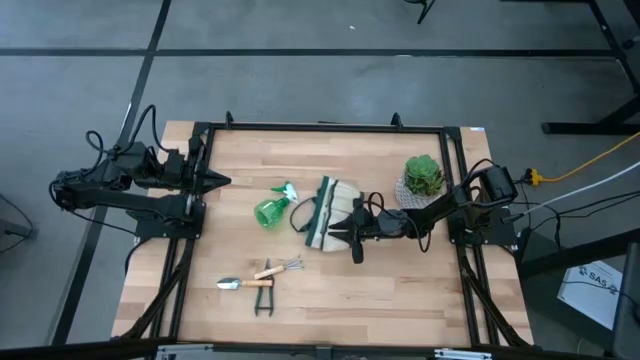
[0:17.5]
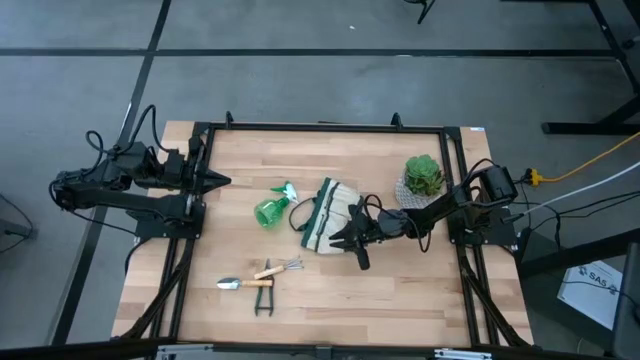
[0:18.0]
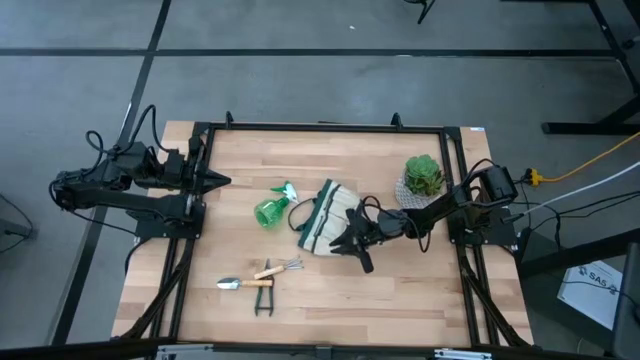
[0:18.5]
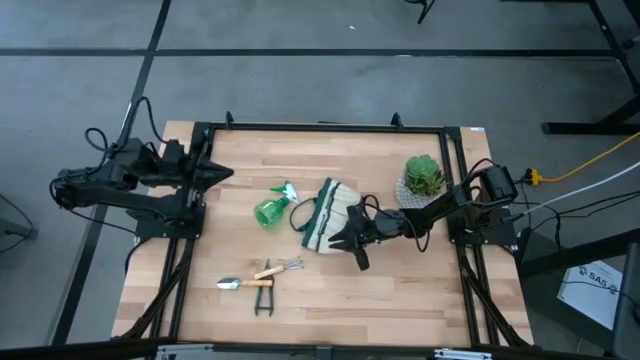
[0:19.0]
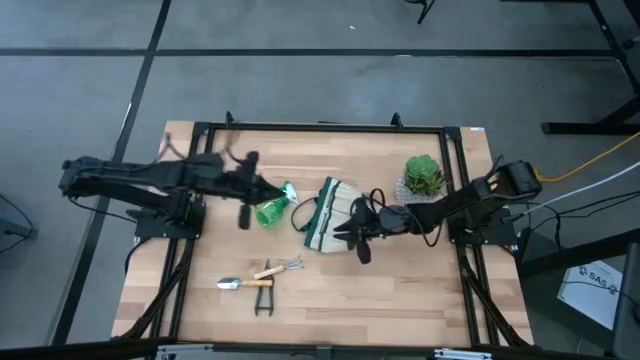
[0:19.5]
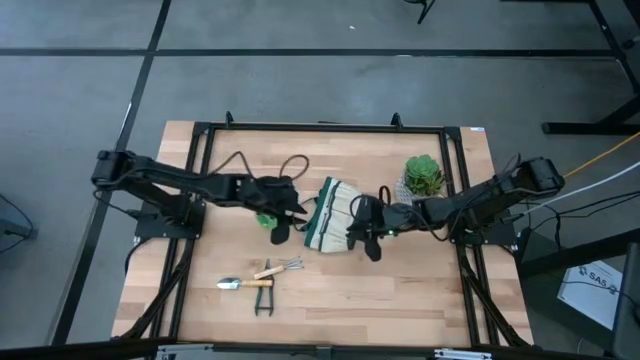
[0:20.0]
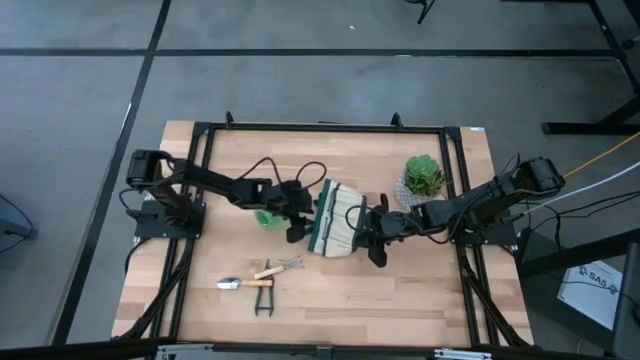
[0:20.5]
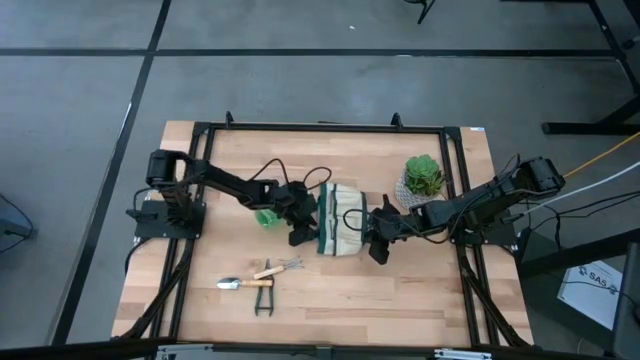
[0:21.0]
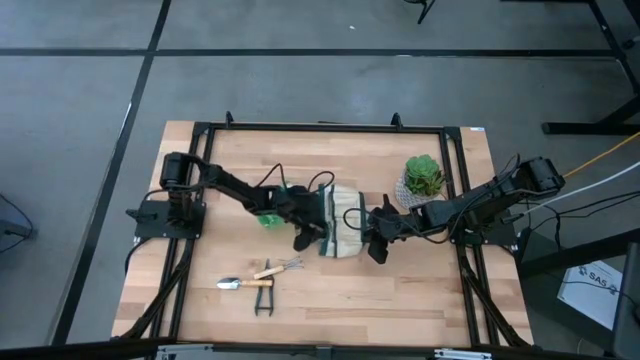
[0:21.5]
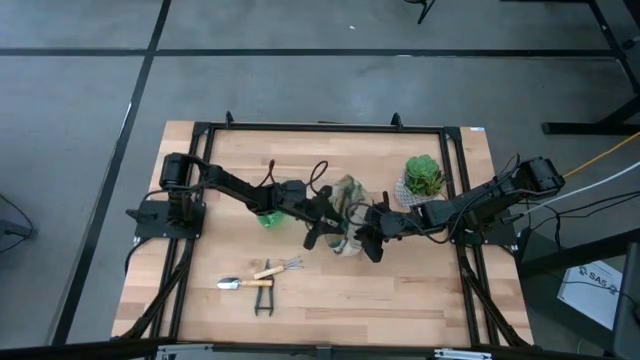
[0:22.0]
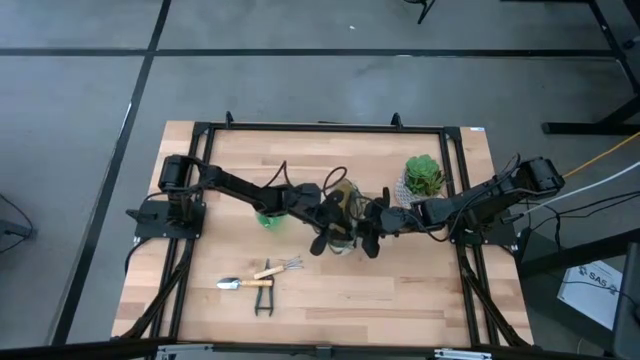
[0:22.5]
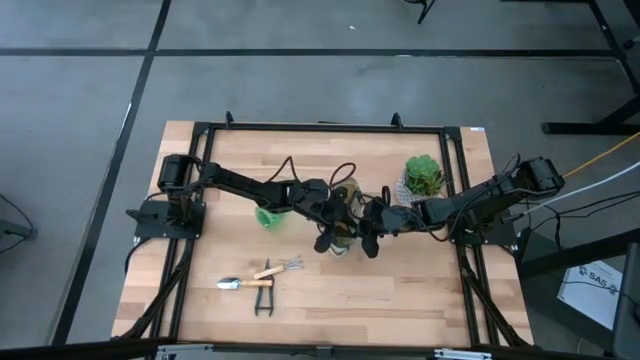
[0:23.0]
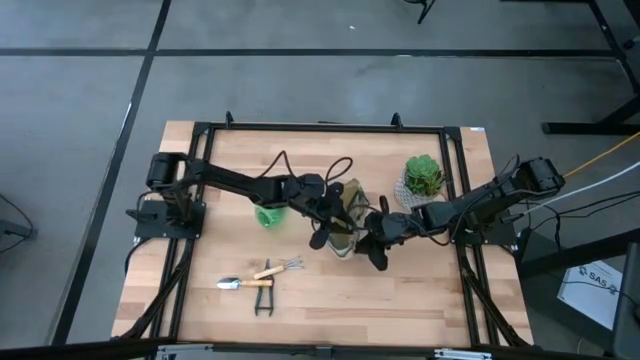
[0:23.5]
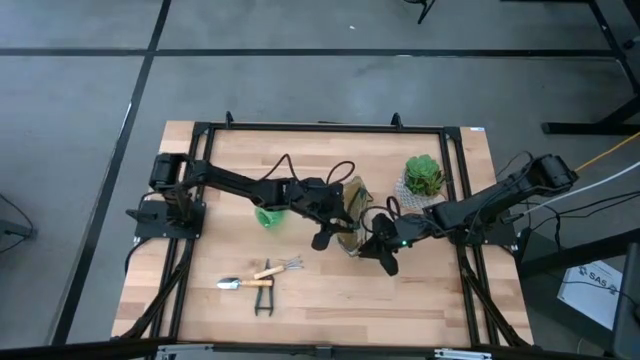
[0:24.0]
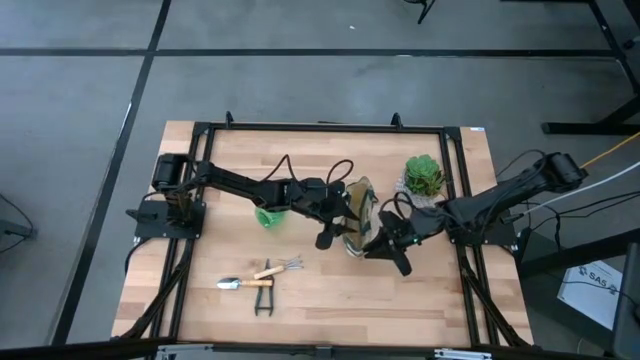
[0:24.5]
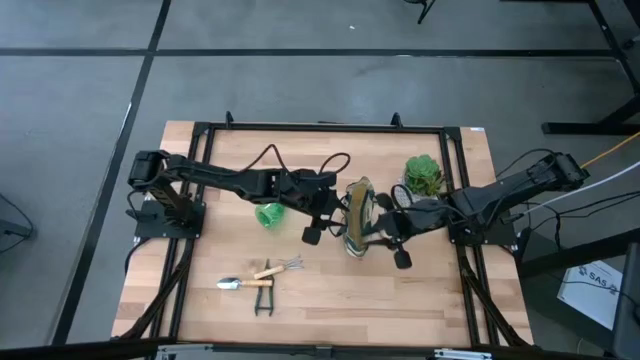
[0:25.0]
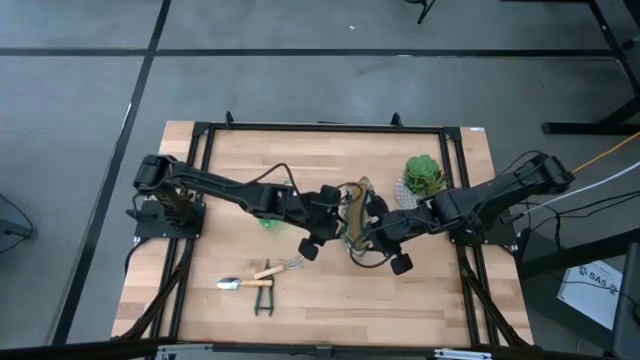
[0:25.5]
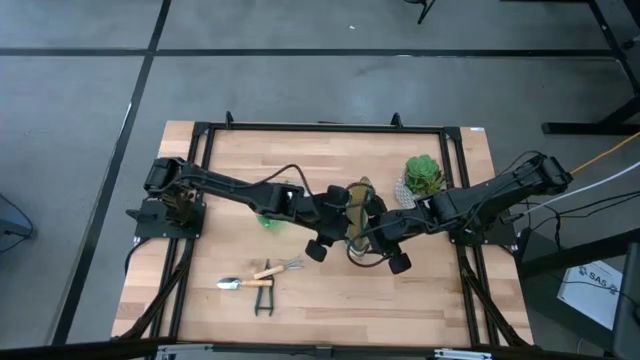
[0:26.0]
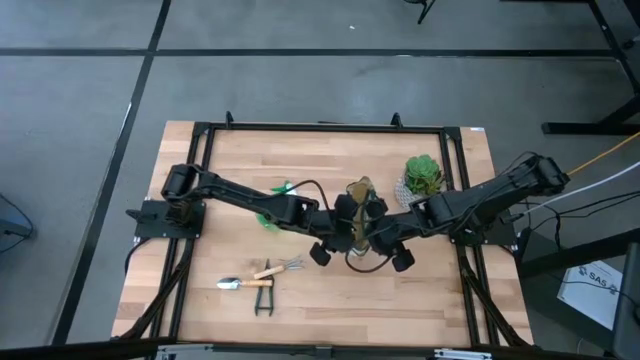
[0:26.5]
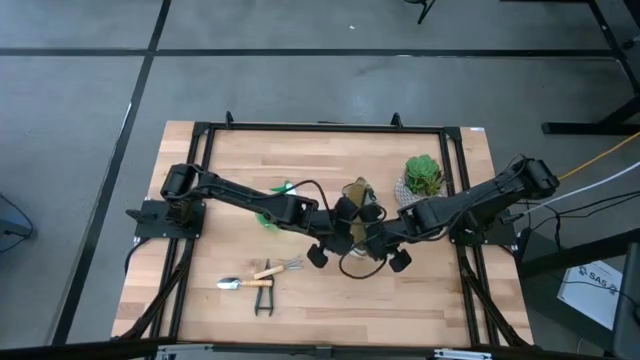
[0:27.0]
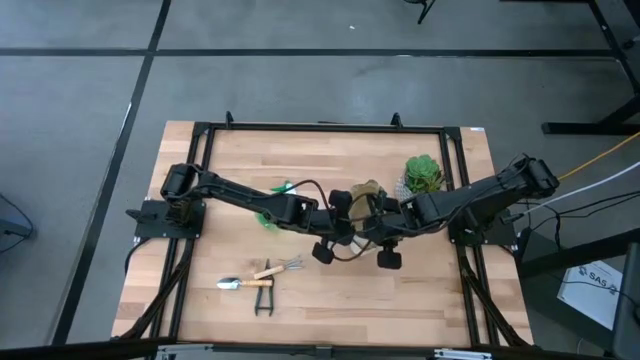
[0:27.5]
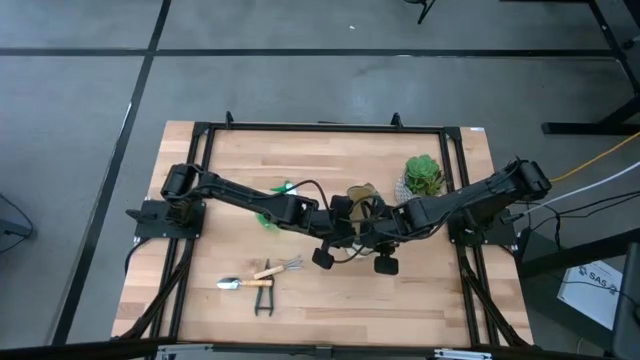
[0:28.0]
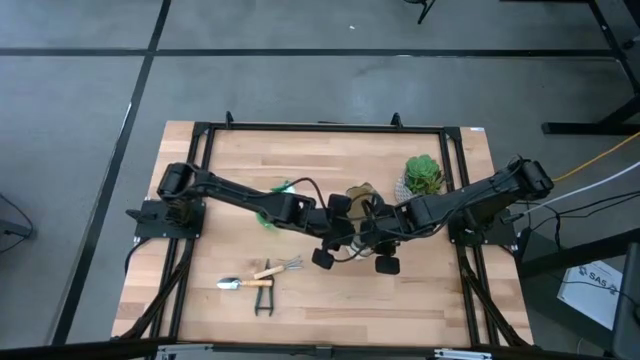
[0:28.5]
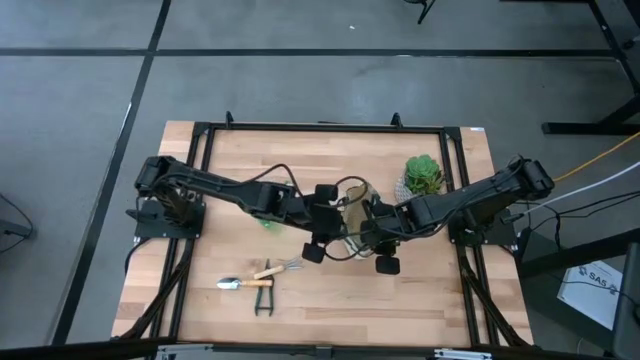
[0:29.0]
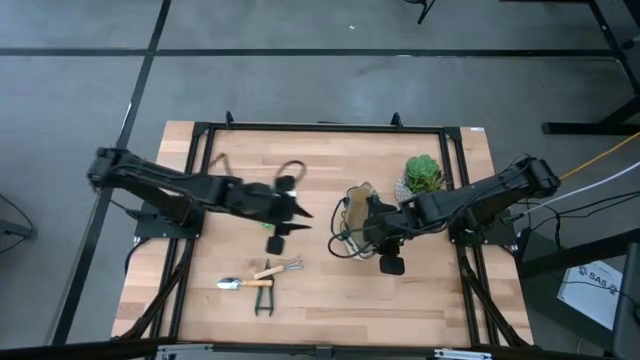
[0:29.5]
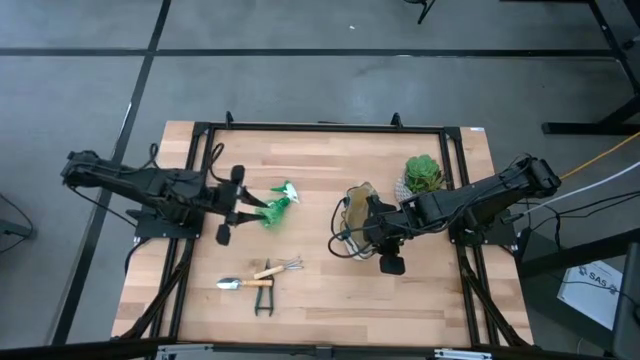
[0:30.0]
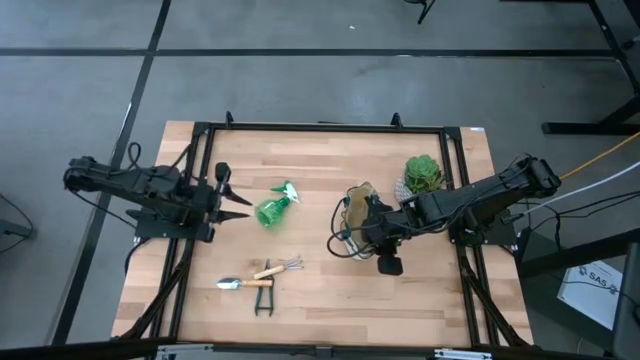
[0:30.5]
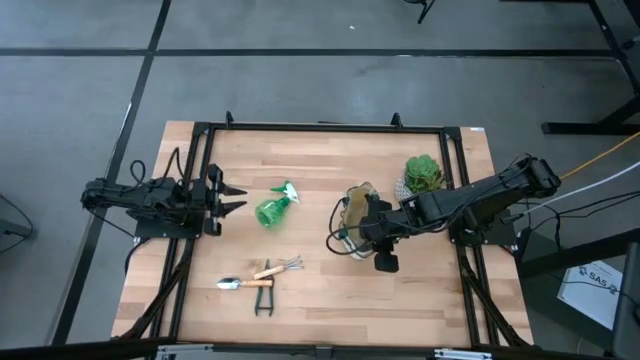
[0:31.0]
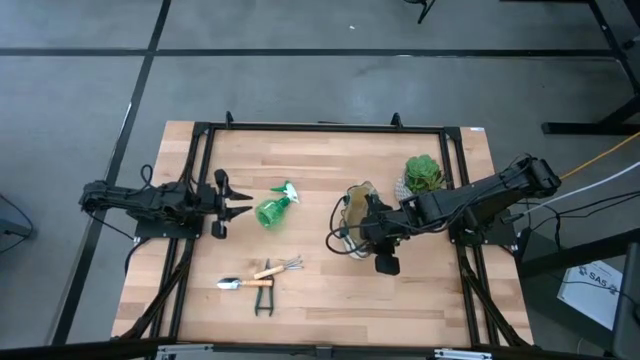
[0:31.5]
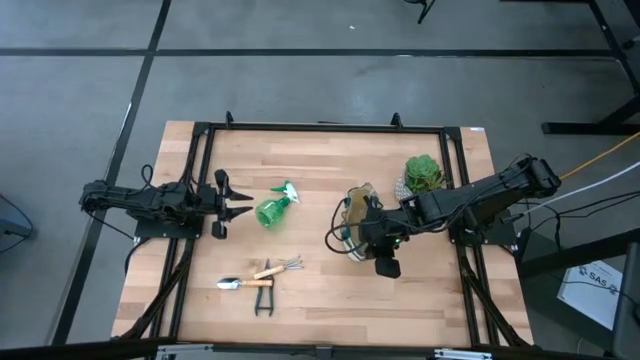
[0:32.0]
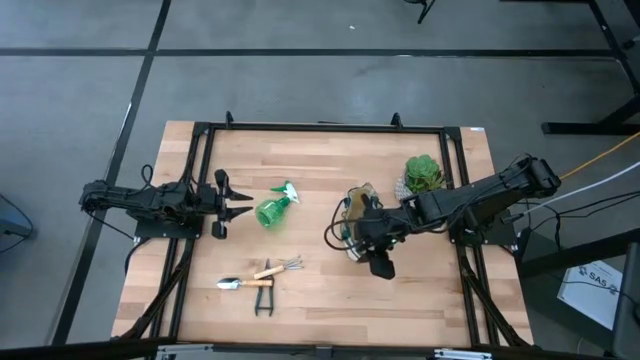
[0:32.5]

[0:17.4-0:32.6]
Task: Pick & Place Garden tools in Gardening bag
Prepare the white gardening bag

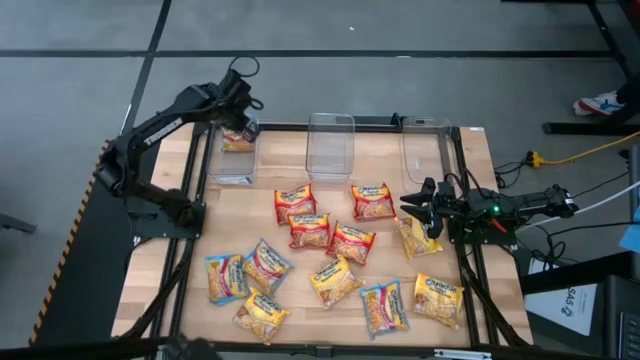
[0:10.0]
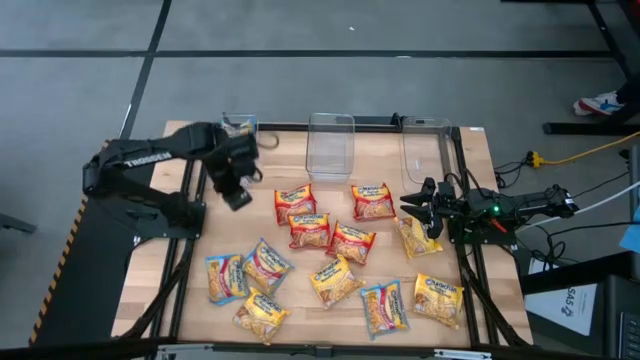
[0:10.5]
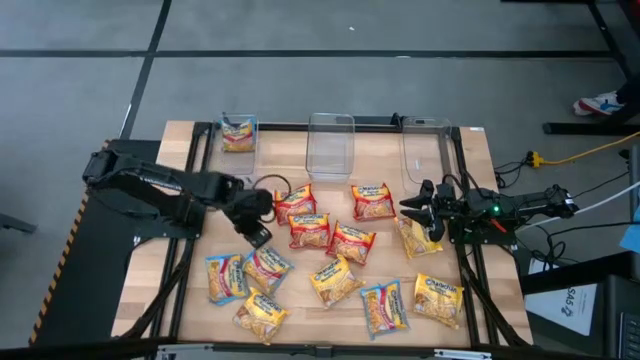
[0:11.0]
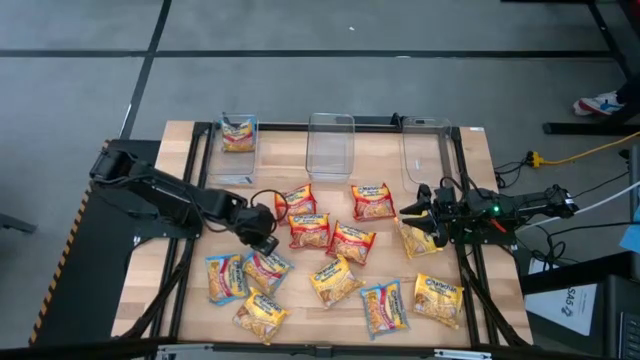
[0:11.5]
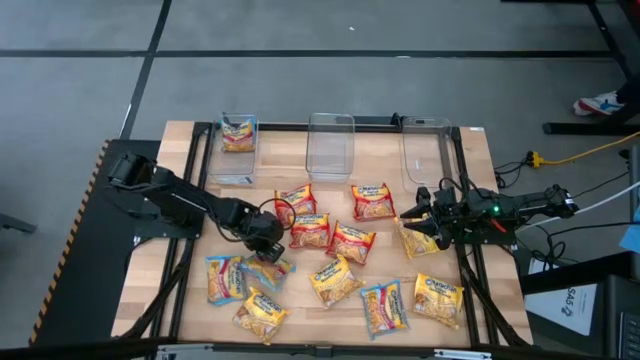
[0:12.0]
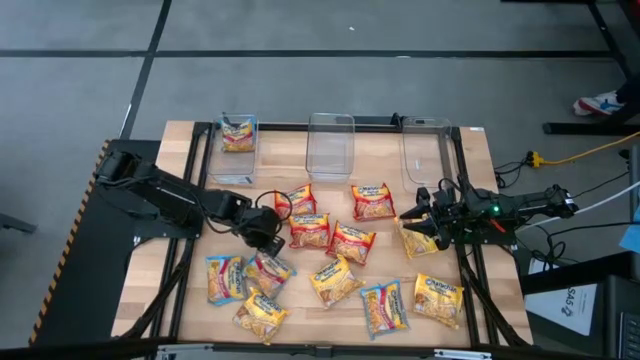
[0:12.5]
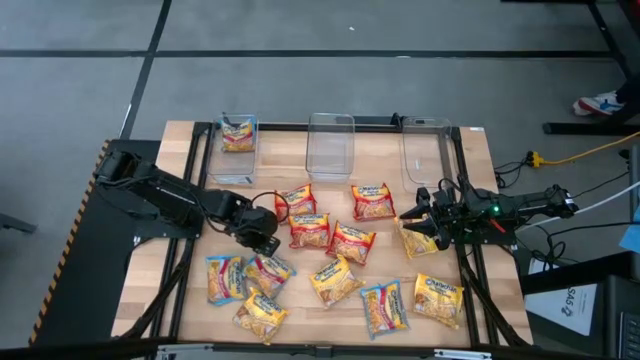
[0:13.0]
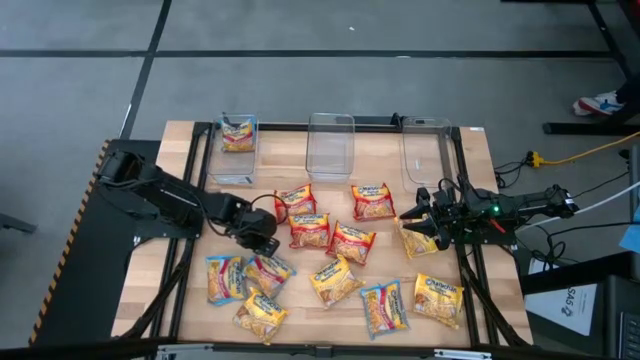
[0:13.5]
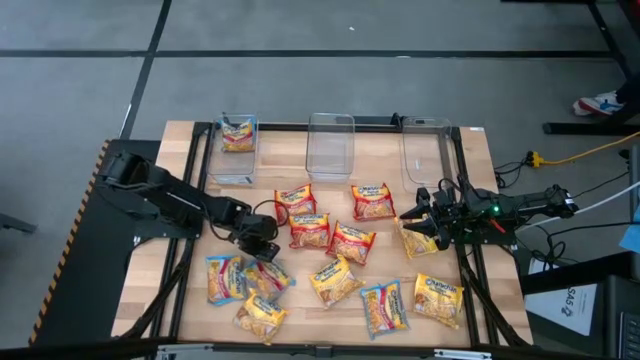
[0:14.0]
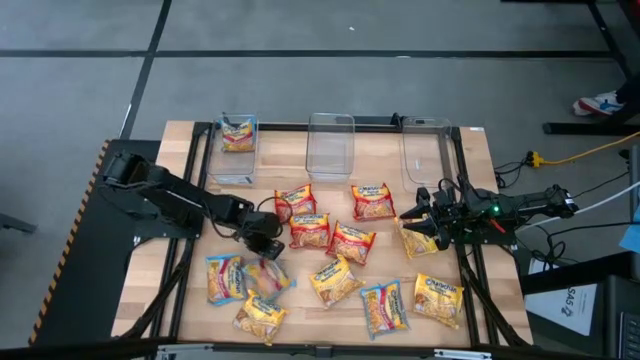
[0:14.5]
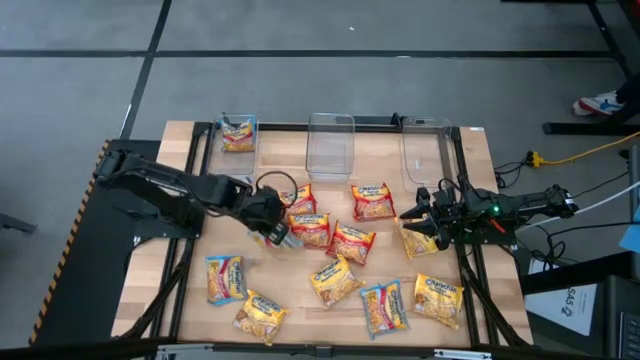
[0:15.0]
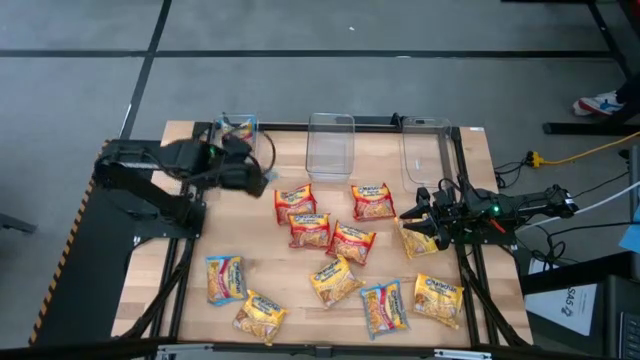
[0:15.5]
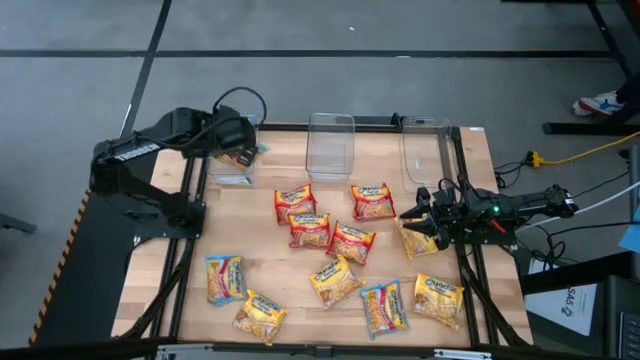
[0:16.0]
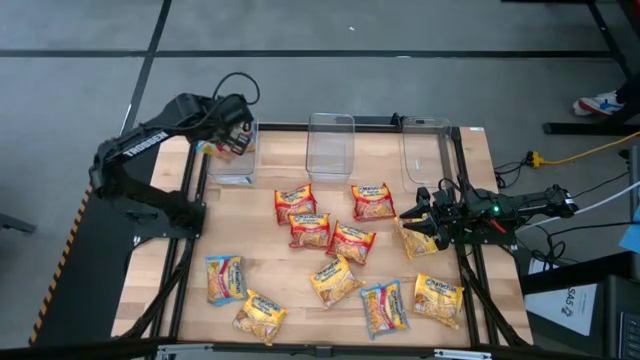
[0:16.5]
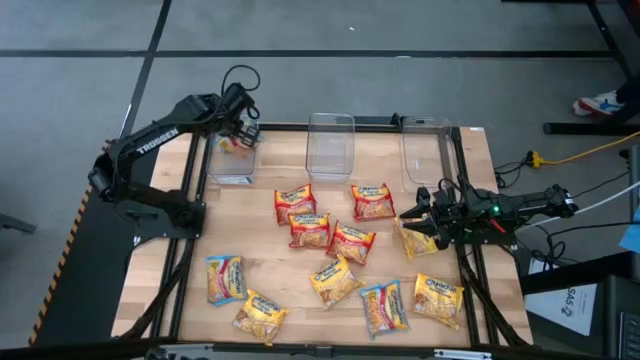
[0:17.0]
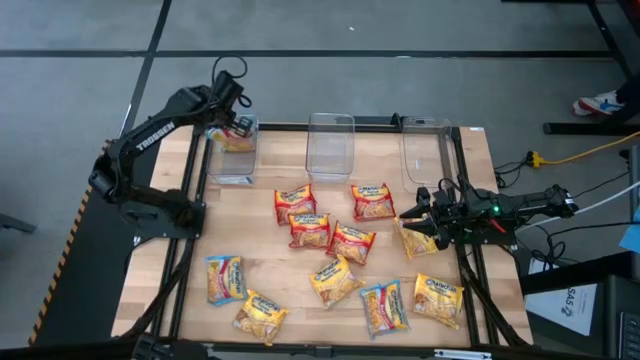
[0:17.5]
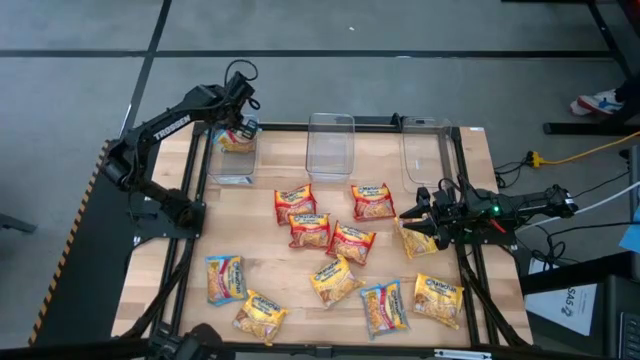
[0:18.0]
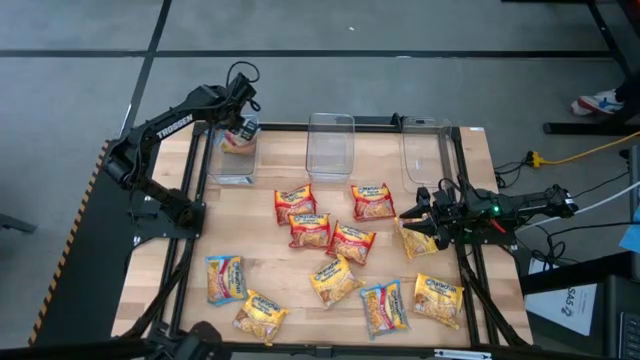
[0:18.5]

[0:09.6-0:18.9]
Task: Sort Maruchan noodles
Put the blue noodle pack in the left transparent basket
